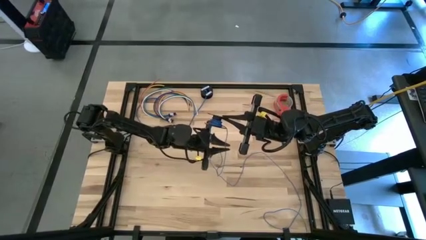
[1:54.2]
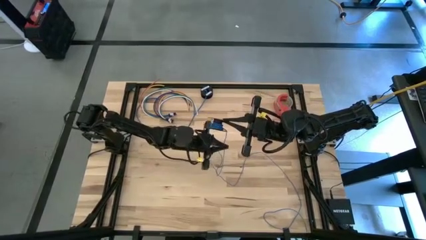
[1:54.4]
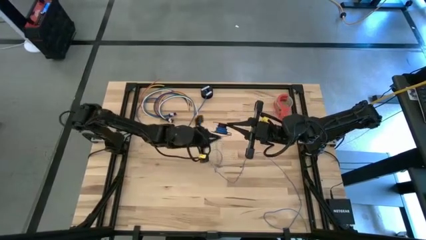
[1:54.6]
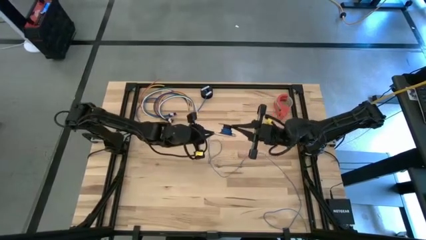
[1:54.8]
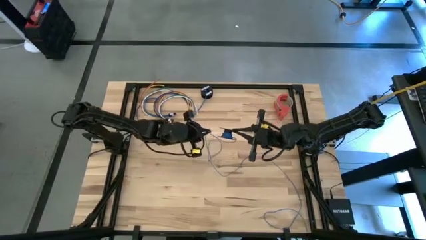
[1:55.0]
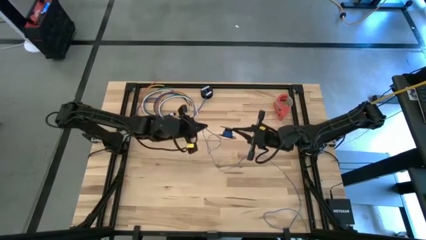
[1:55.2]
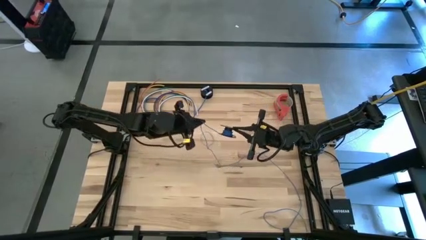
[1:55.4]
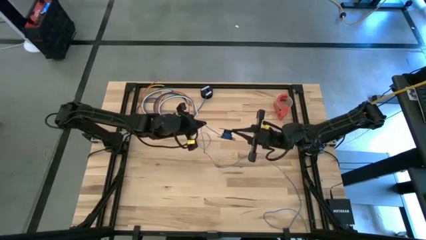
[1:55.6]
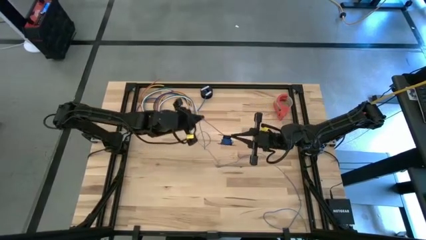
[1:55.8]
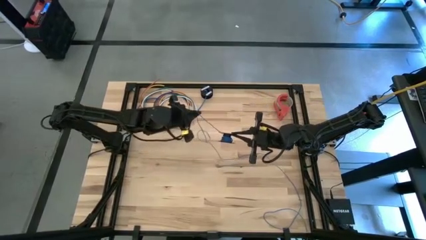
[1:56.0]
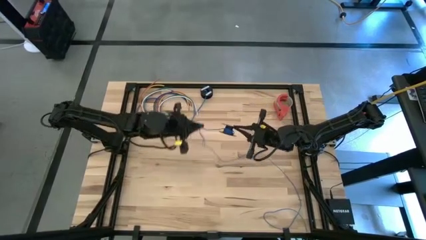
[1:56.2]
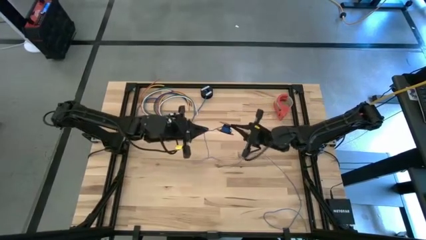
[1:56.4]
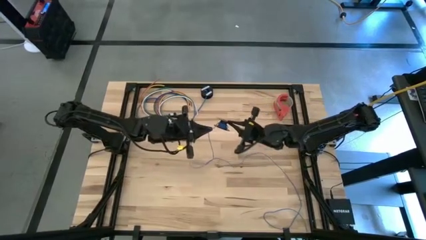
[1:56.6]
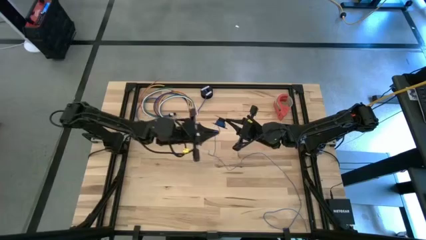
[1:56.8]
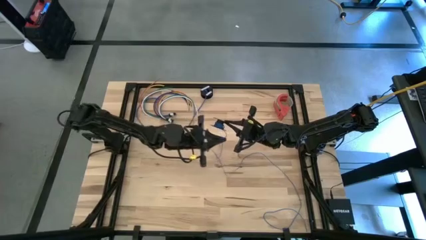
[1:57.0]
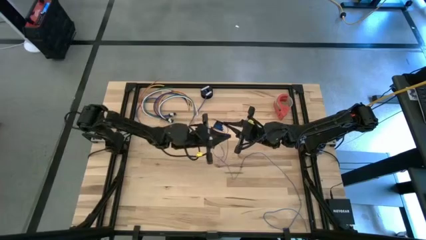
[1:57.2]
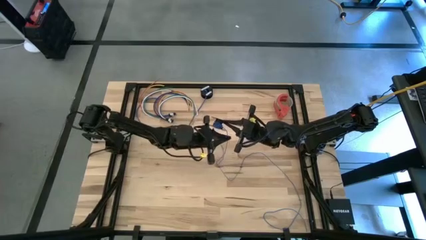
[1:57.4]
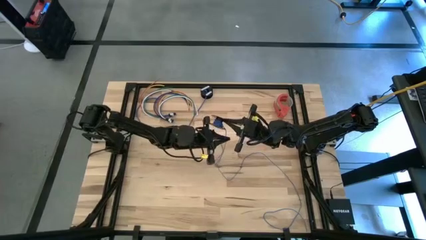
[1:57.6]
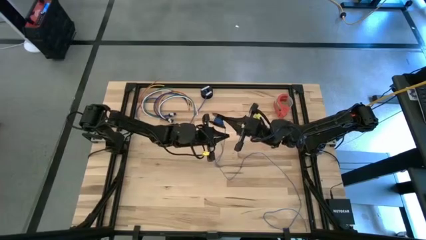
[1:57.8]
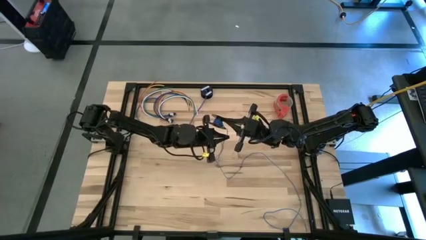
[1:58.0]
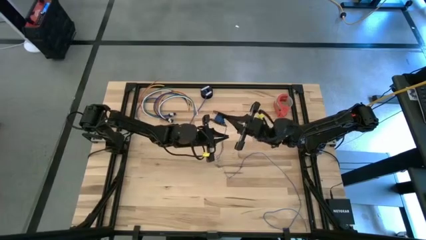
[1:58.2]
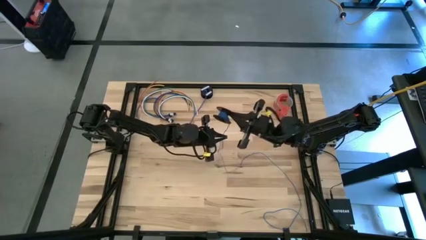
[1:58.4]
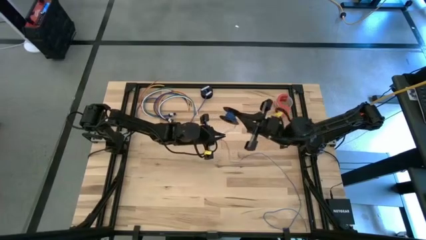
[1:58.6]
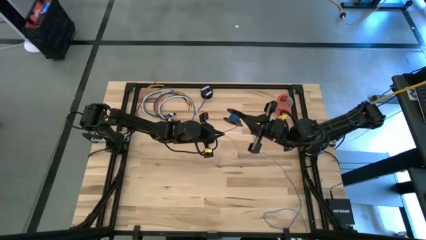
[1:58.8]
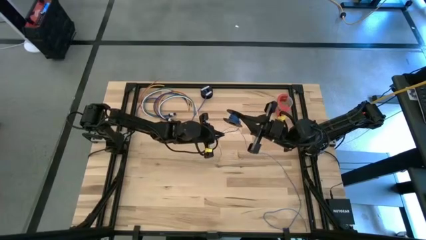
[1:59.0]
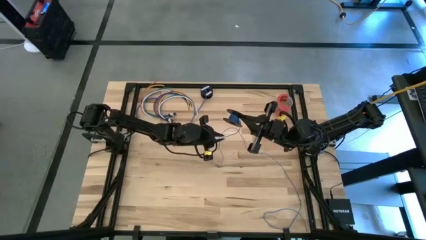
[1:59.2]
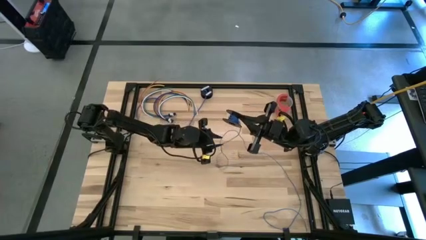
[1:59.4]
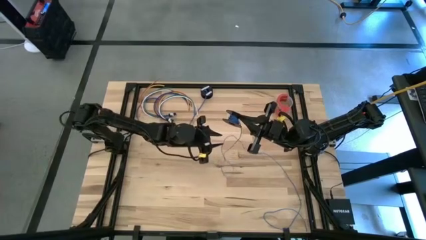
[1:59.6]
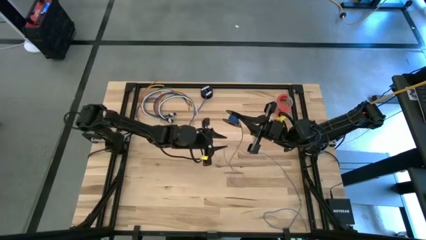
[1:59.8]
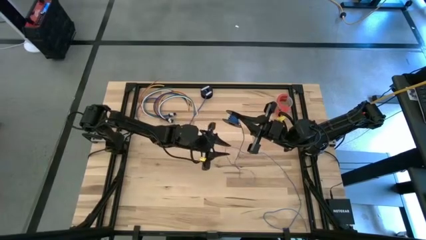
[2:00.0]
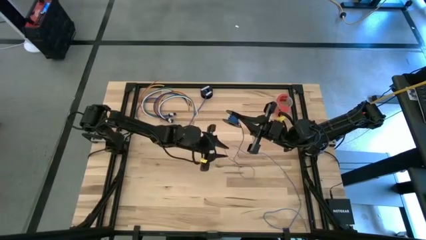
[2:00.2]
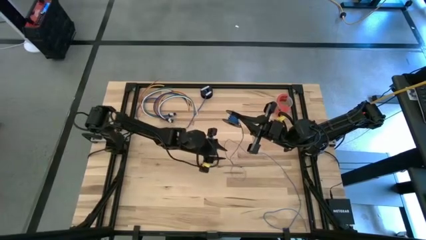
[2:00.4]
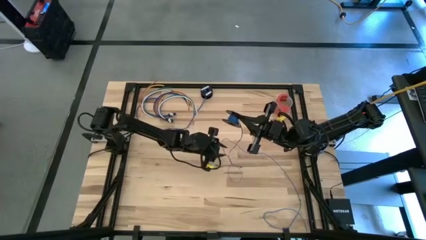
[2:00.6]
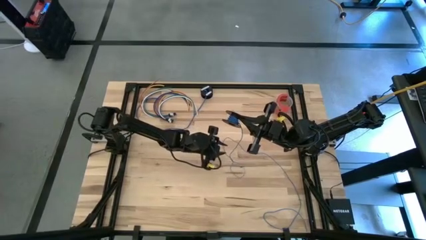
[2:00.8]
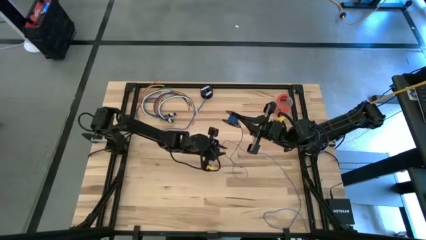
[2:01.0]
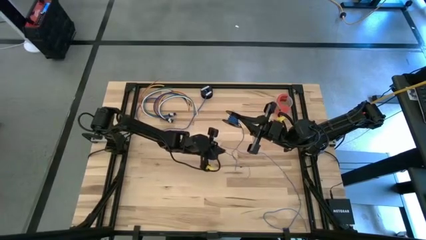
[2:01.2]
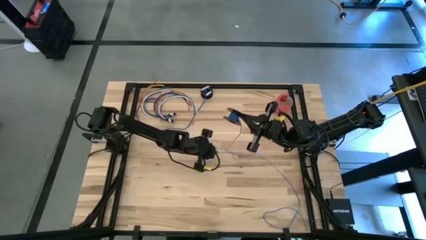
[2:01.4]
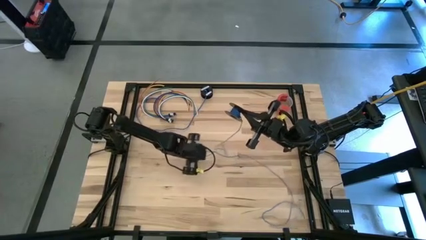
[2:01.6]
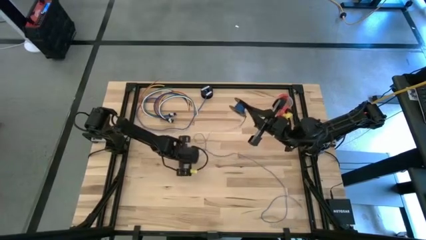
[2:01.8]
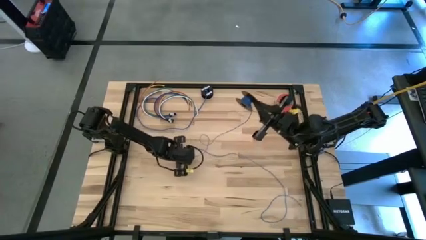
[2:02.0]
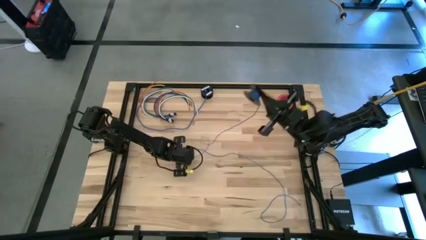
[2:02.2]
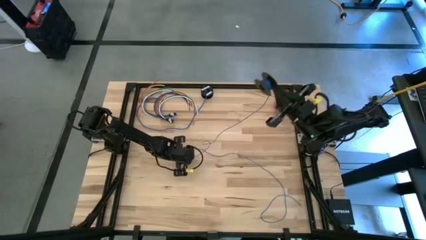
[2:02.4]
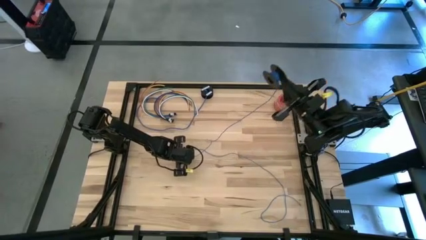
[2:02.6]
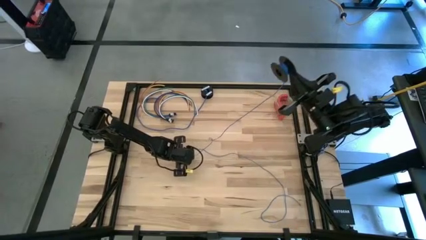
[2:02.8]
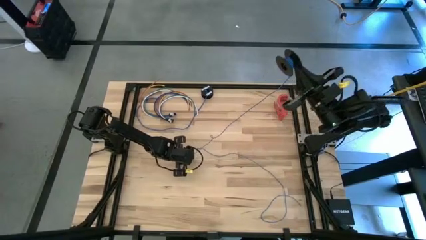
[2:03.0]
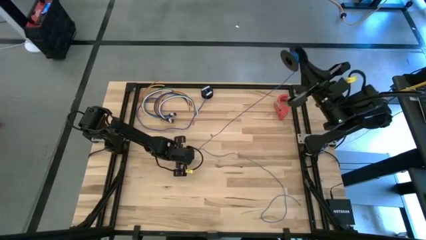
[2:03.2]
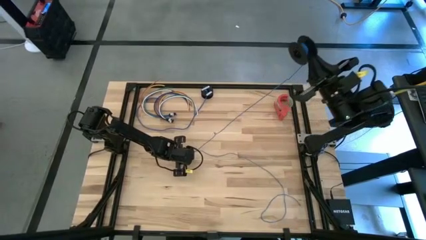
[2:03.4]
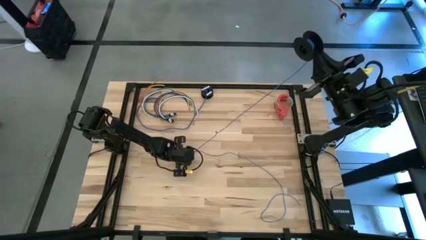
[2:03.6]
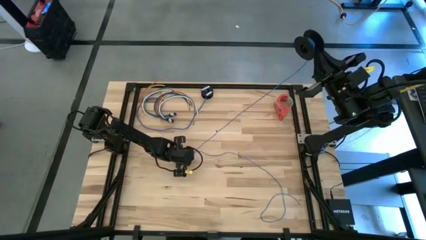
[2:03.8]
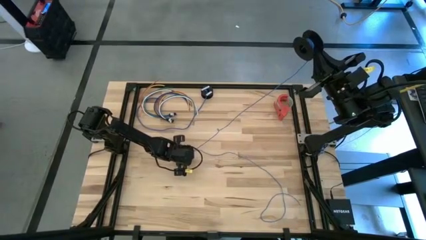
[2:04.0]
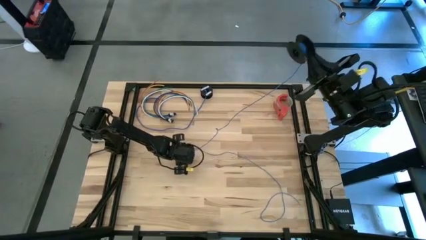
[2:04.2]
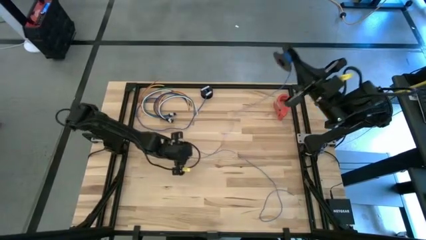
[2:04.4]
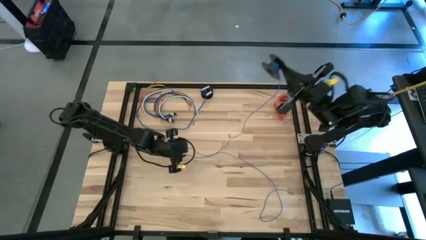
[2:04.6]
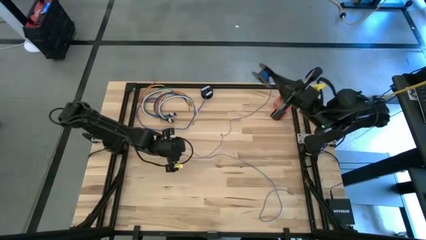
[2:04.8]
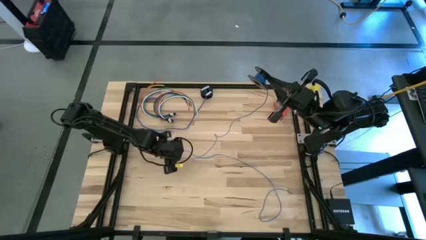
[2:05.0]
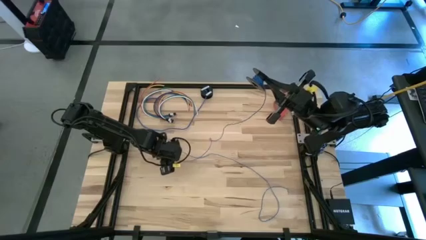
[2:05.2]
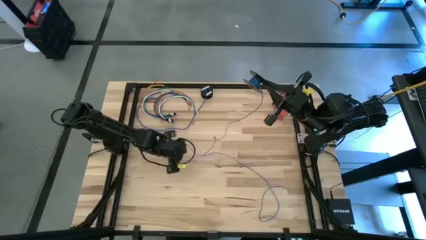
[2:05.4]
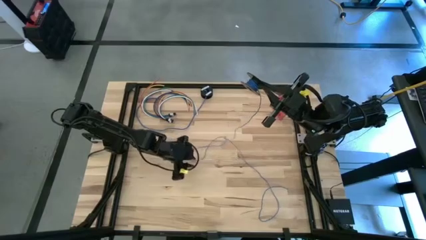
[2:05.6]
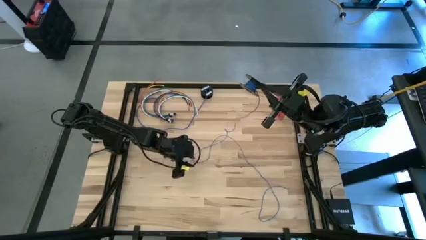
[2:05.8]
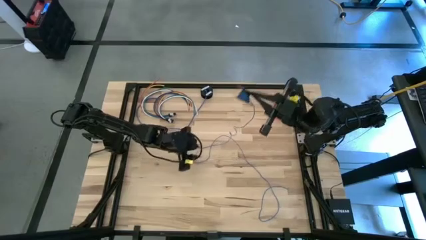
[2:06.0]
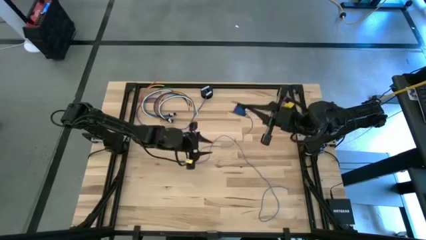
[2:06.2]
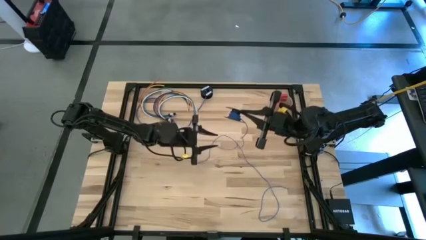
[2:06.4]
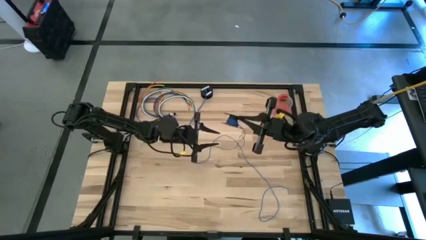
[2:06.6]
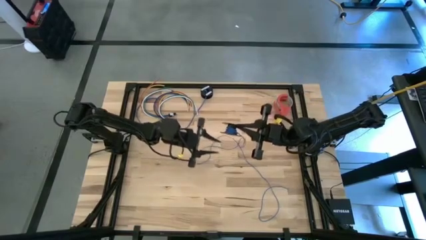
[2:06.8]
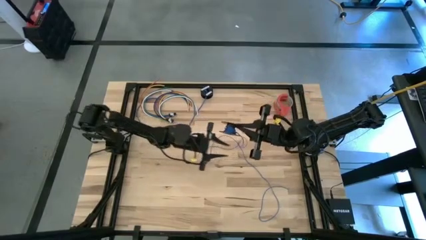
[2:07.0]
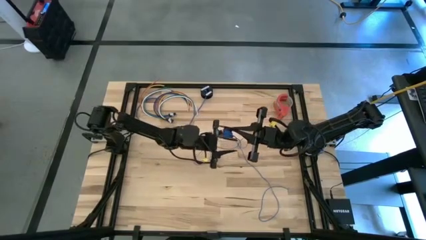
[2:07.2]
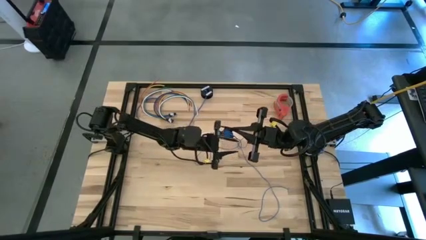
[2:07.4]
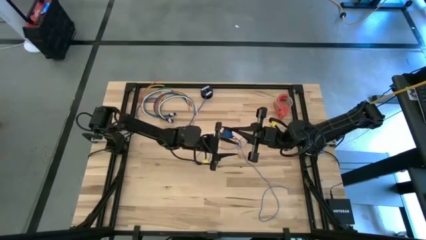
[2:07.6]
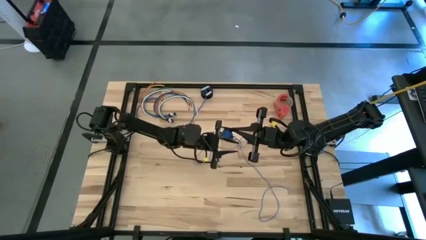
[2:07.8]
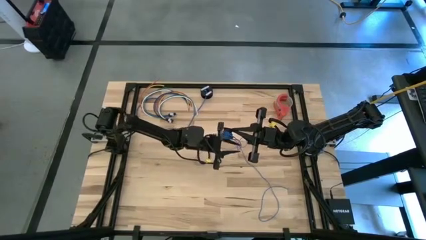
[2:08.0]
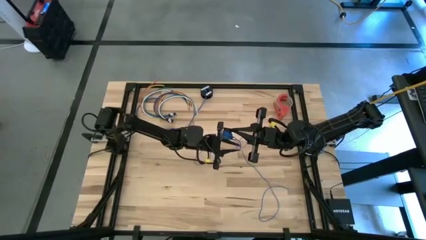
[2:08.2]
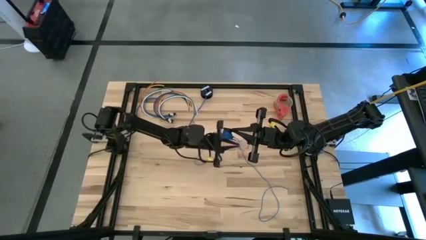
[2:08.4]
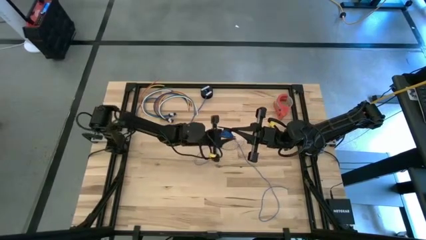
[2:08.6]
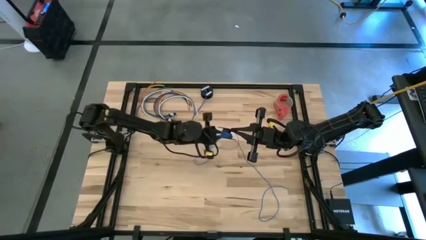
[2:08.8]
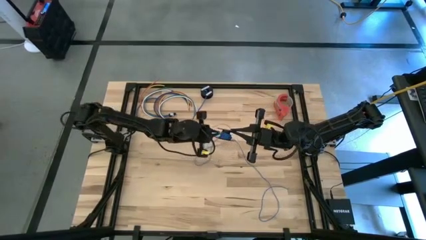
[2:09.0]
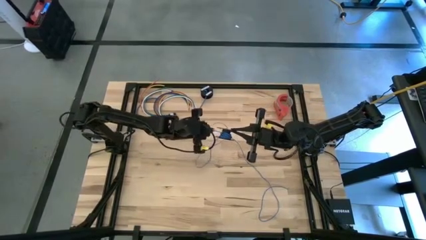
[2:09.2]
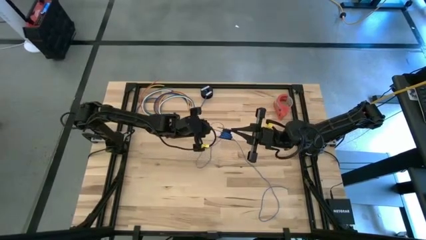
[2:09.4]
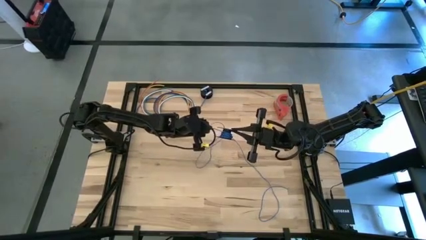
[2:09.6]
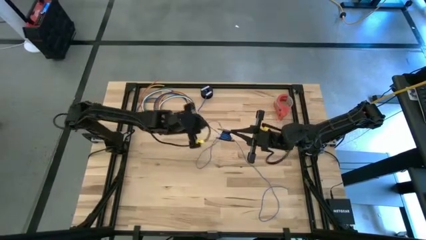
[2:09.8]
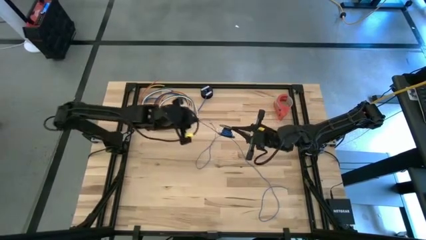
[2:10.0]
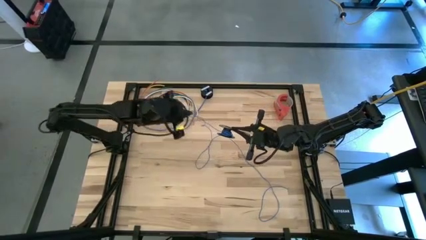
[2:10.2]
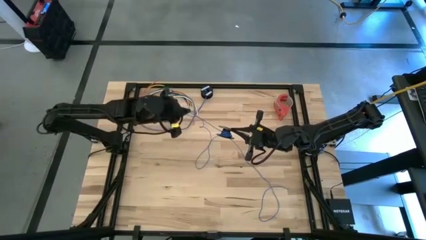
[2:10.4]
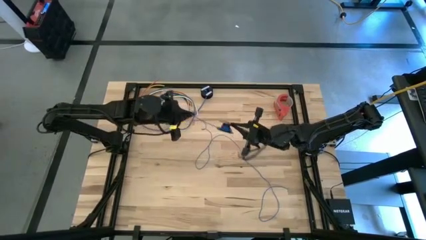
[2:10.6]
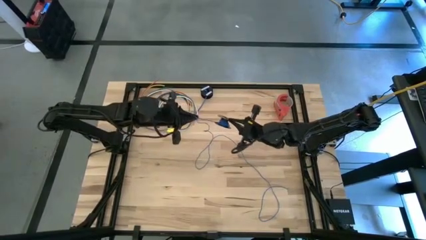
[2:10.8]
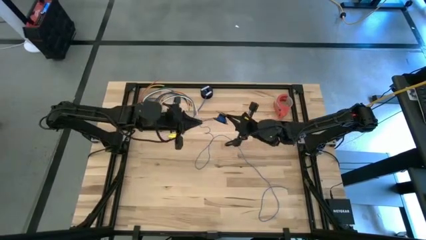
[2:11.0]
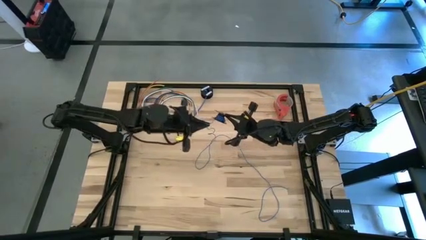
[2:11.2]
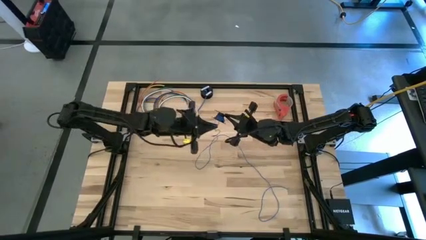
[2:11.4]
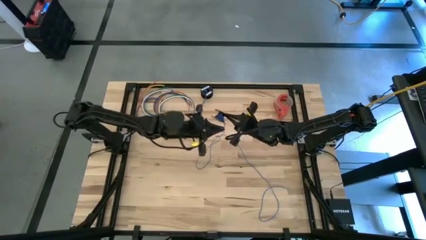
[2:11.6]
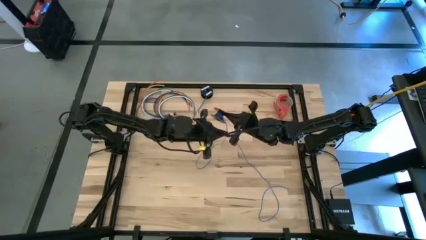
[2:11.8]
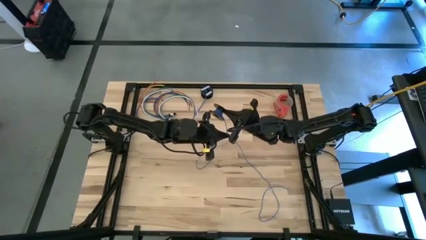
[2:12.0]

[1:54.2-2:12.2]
Task: Coil cords
Coil the blue wire onto the black spool
